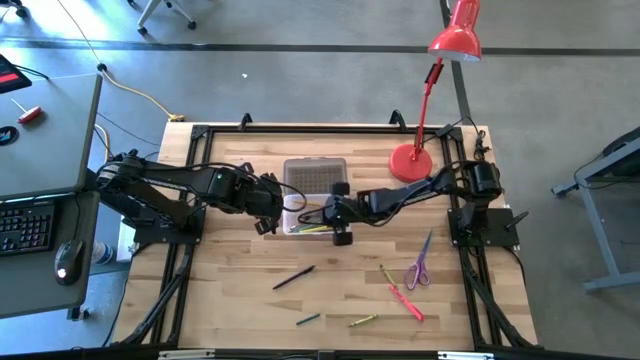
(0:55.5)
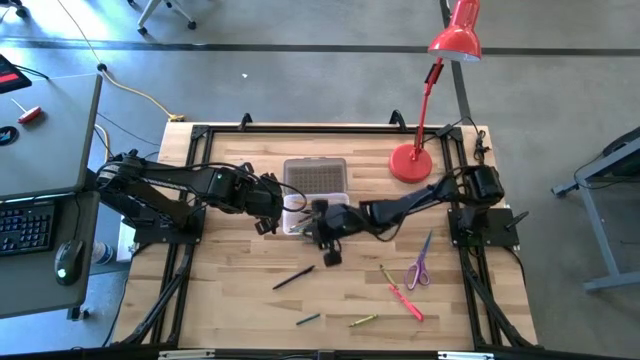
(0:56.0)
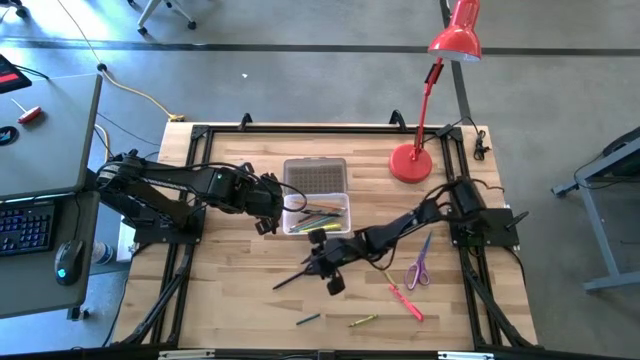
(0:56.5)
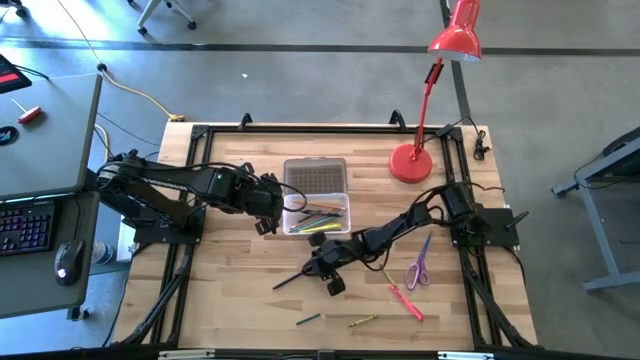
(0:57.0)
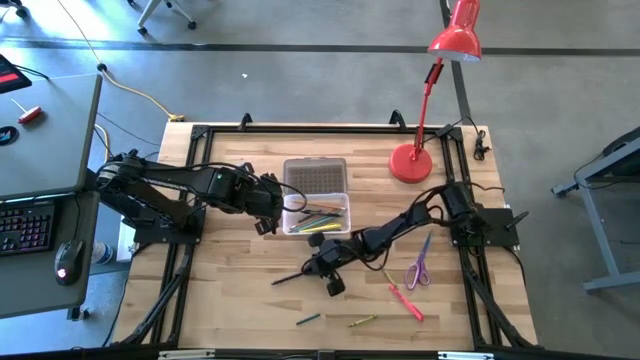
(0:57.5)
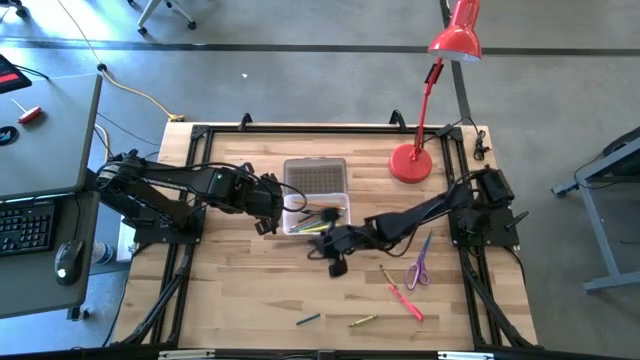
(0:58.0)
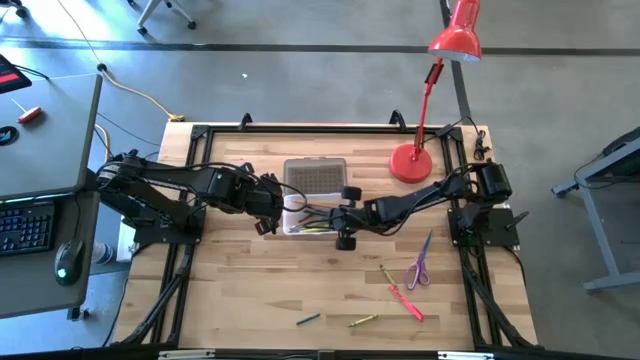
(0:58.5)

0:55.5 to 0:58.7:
Task: Pick & place school supplies into a supply box
Put the black pen into the supply box

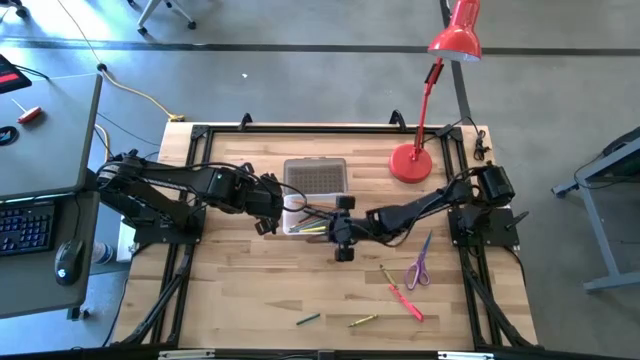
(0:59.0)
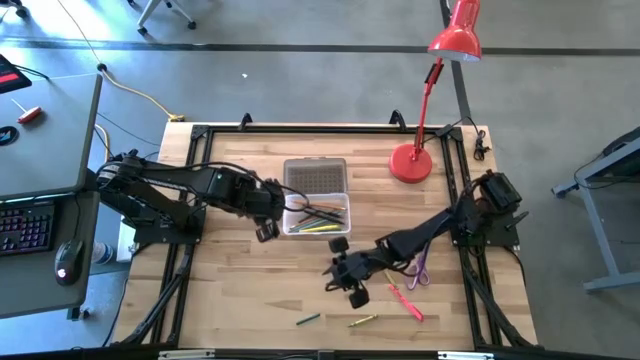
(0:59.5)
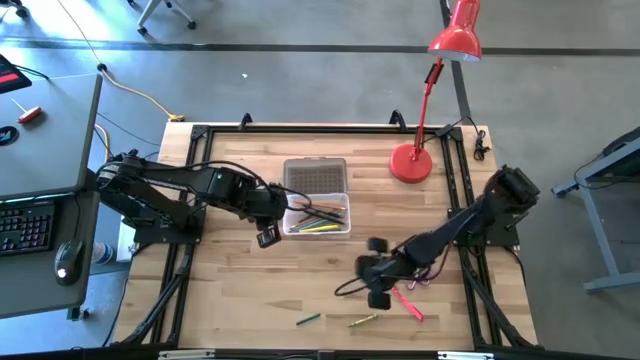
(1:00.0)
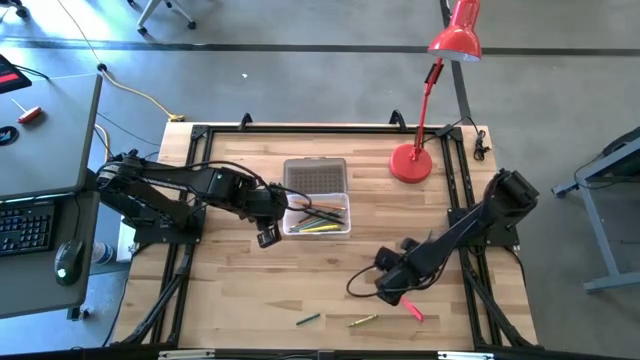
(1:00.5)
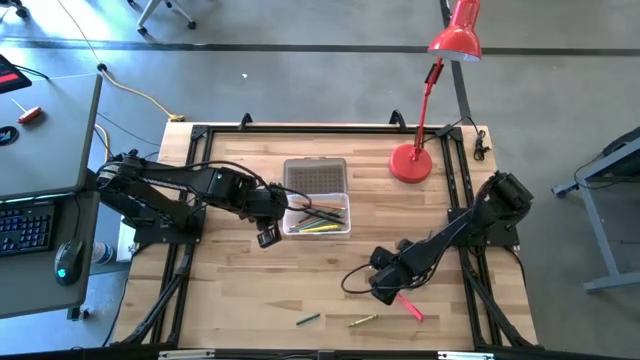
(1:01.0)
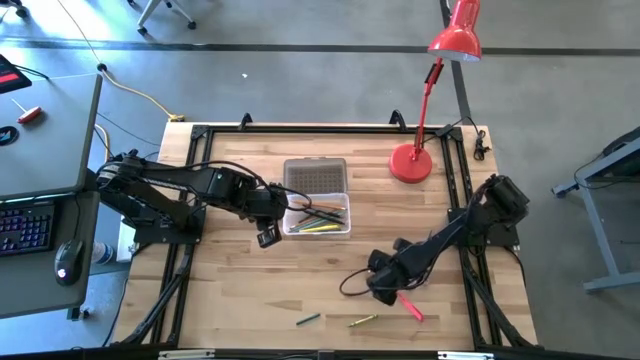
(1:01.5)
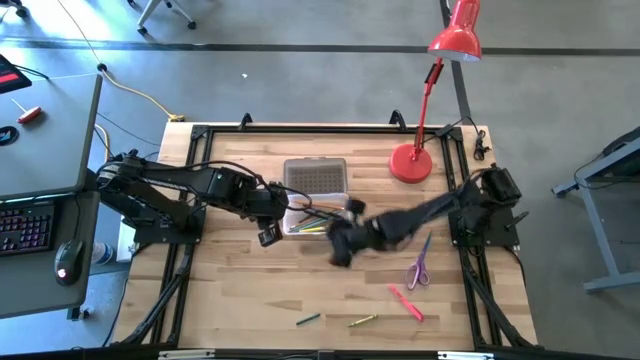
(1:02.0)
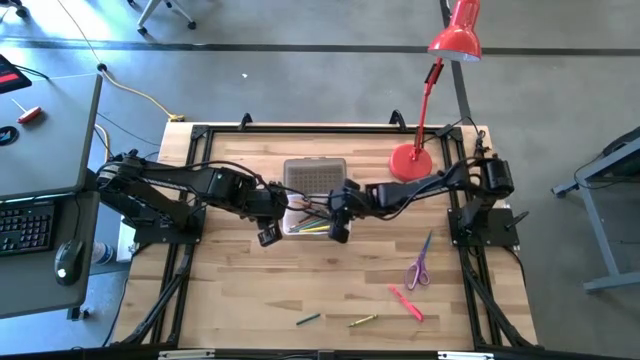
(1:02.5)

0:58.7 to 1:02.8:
Put the green crayon into the supply box

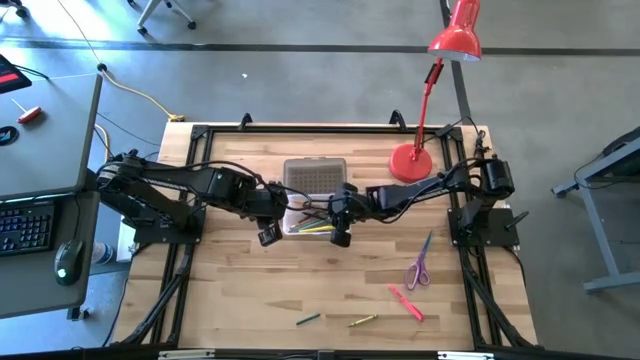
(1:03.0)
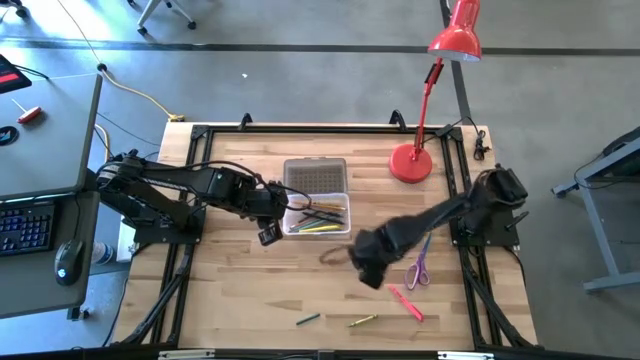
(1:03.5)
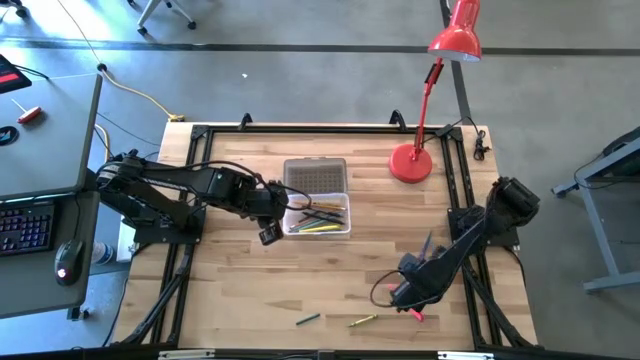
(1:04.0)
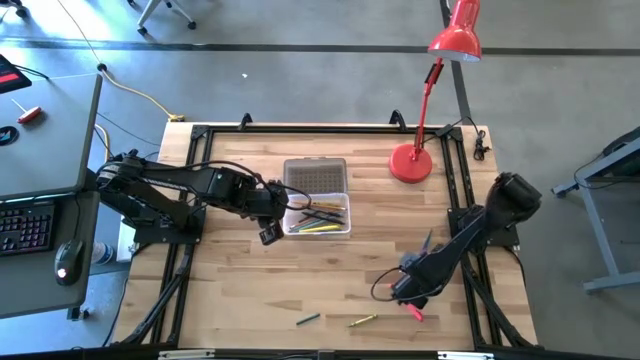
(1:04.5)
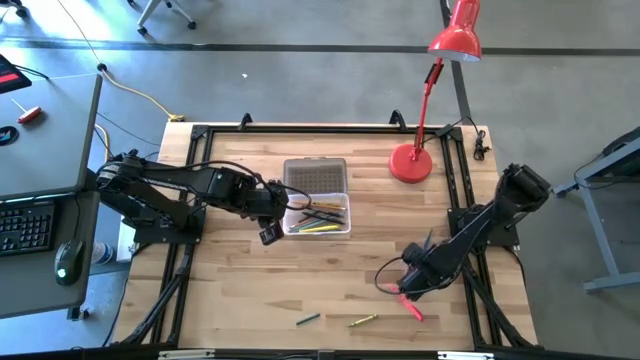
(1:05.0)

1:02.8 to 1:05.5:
Put the violet scissors into the supply box

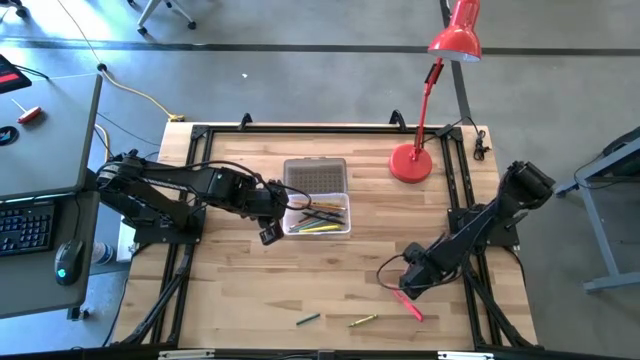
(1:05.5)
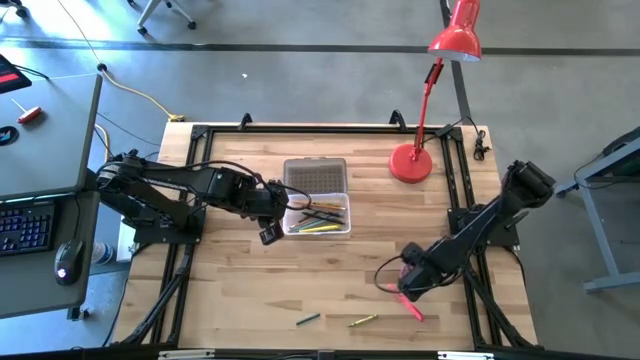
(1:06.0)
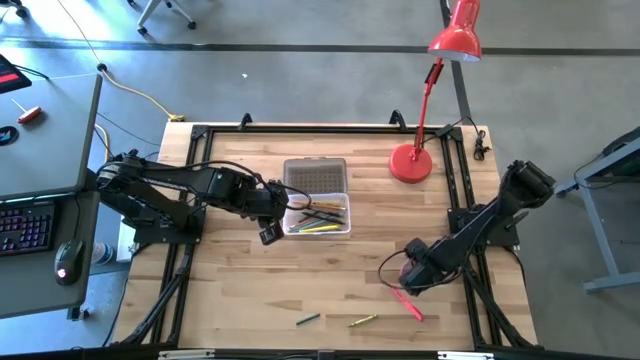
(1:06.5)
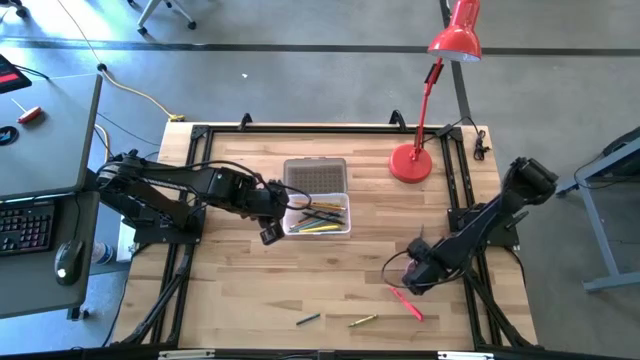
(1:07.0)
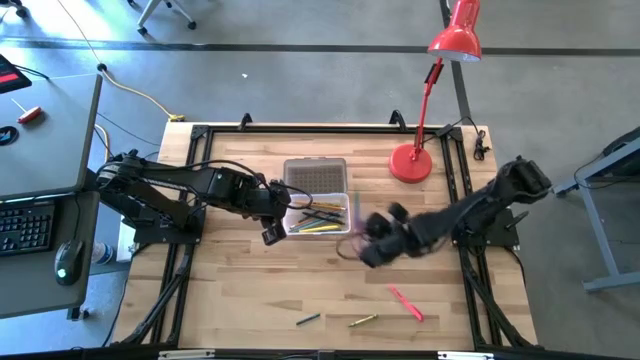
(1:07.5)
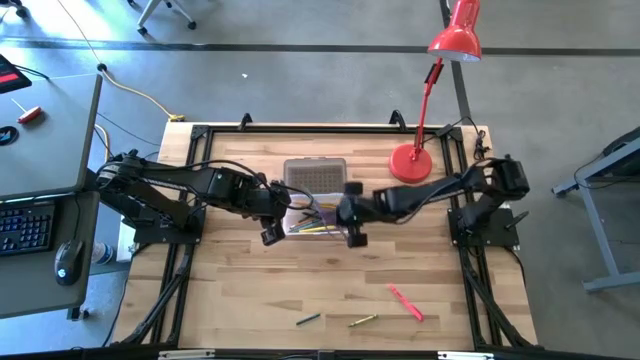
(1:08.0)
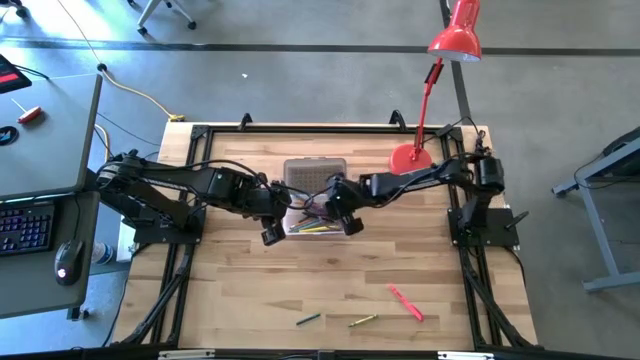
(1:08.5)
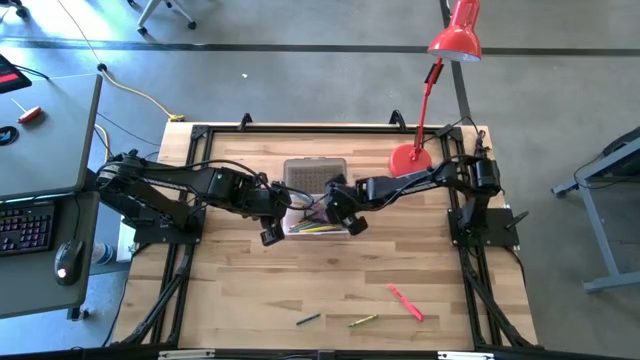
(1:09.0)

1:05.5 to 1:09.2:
Put the violet scissors into the supply box

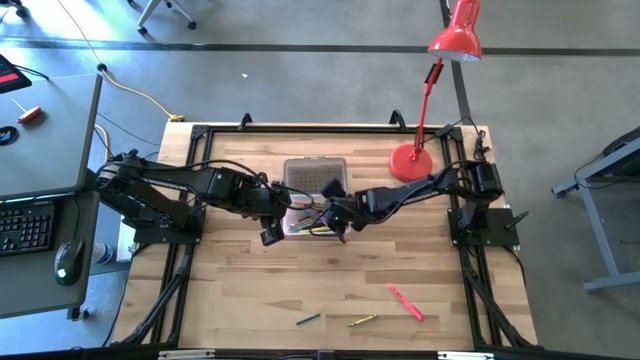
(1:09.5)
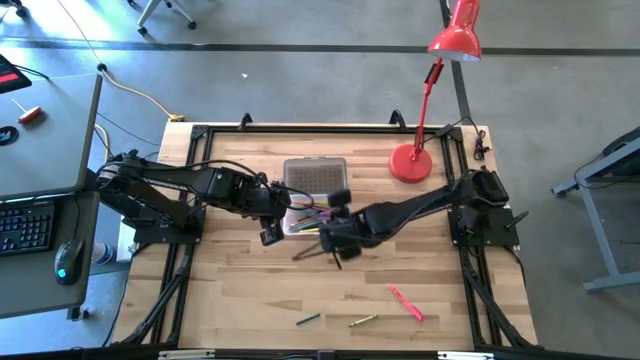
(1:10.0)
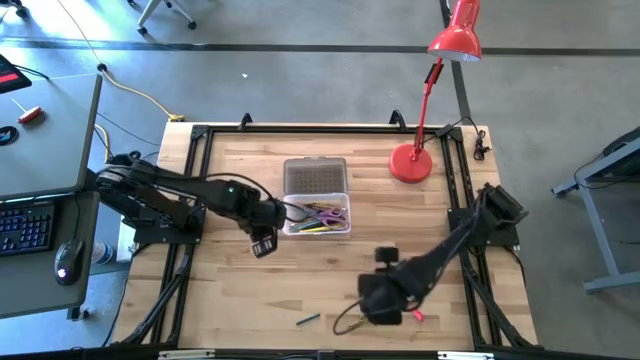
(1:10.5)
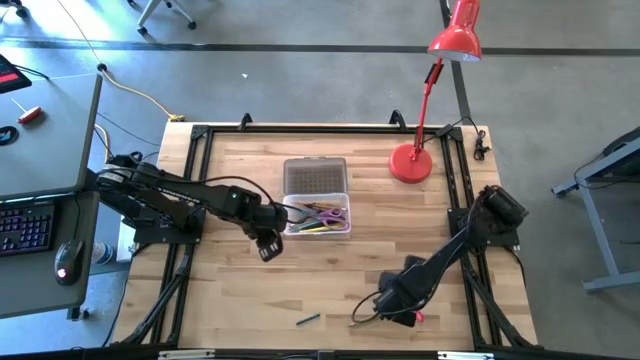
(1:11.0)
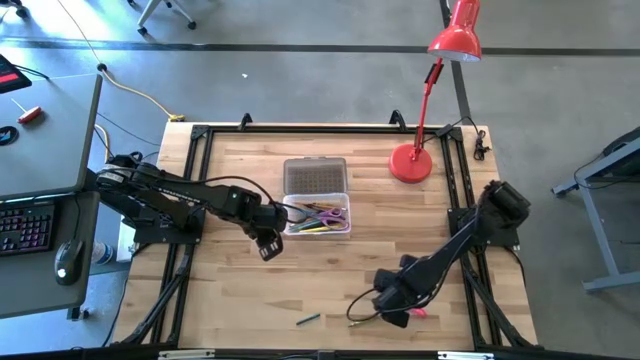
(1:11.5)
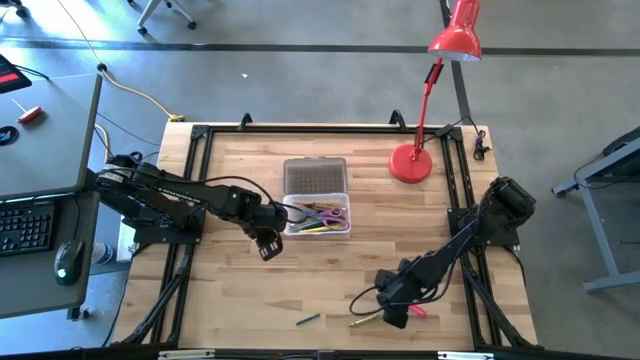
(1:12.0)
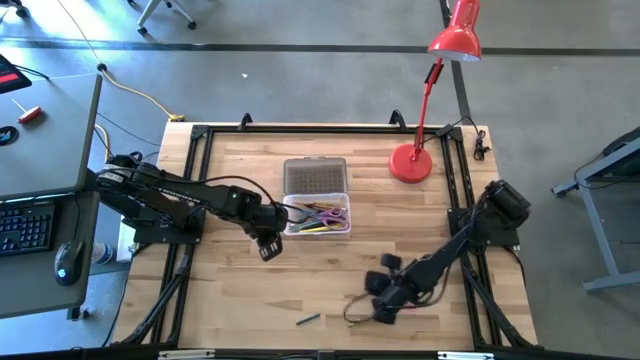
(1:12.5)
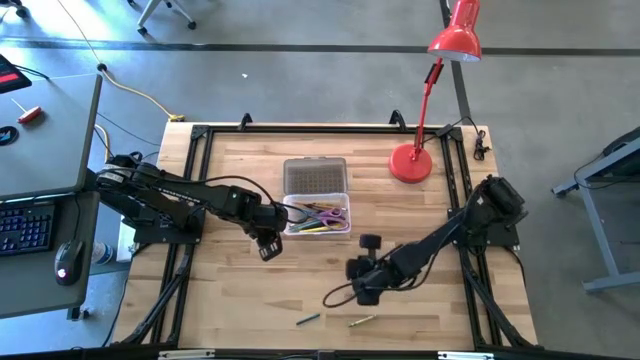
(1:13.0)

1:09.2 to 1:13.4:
Put the pink pen into the supply box

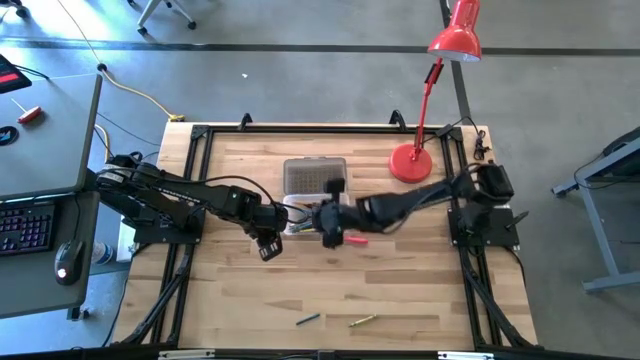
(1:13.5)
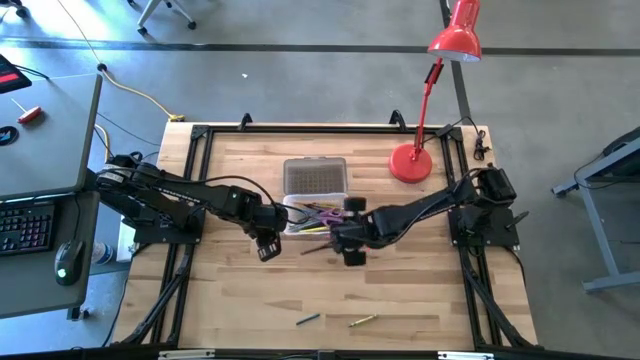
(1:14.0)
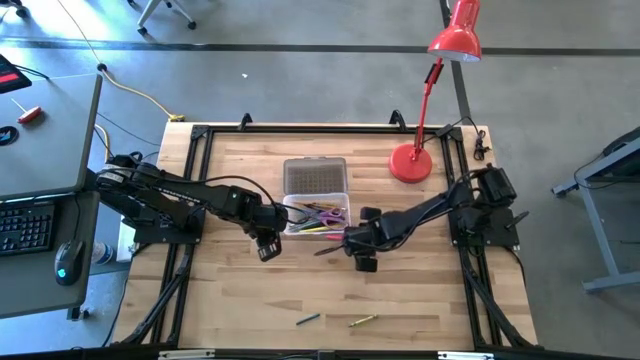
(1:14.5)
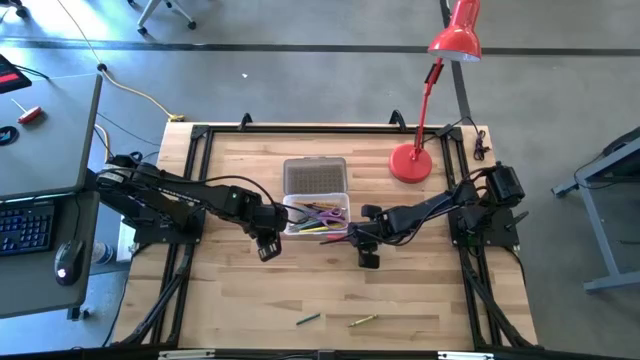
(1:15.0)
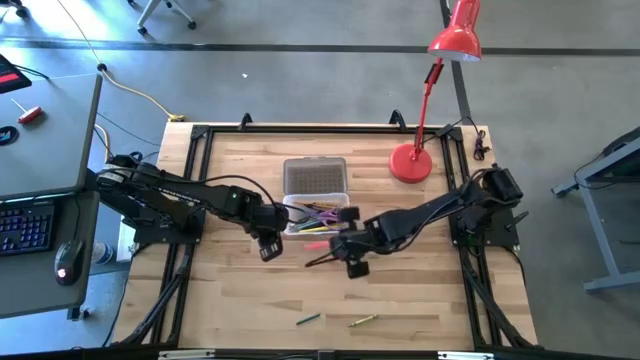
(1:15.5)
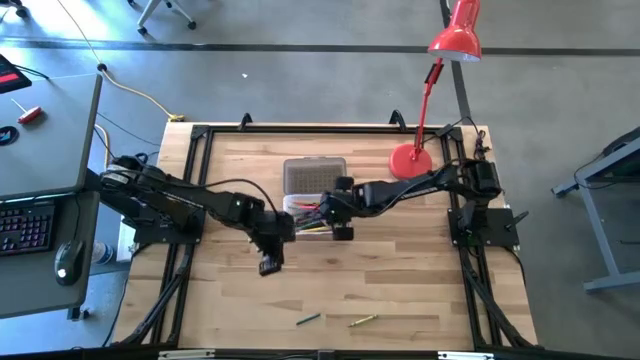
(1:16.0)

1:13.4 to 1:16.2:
Put the pink pen into the supply box
